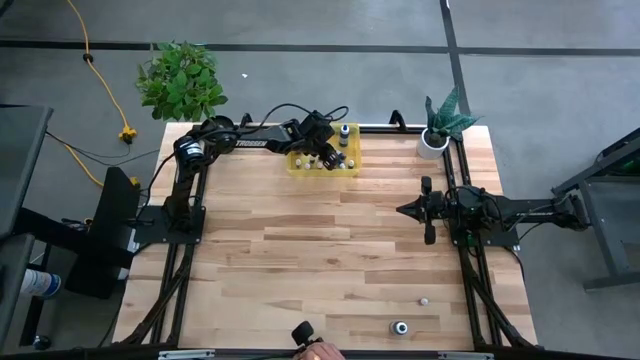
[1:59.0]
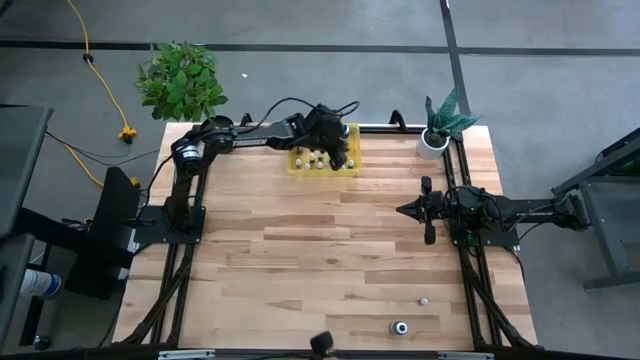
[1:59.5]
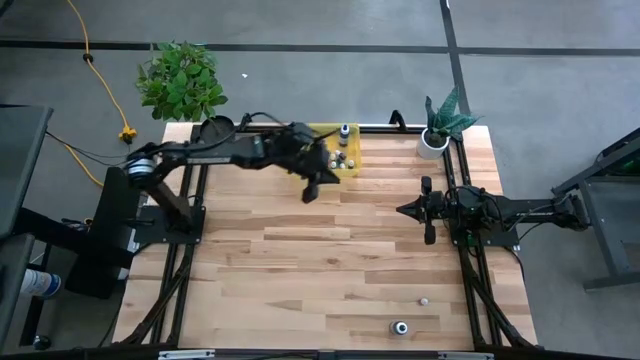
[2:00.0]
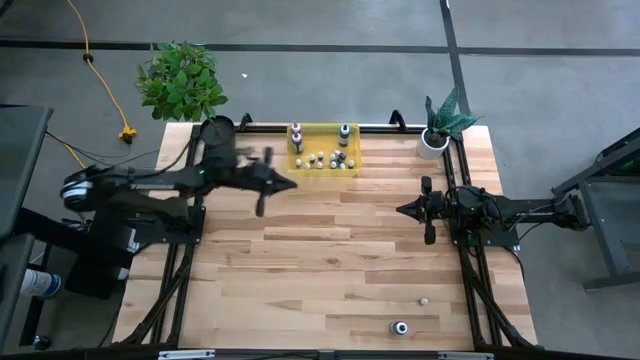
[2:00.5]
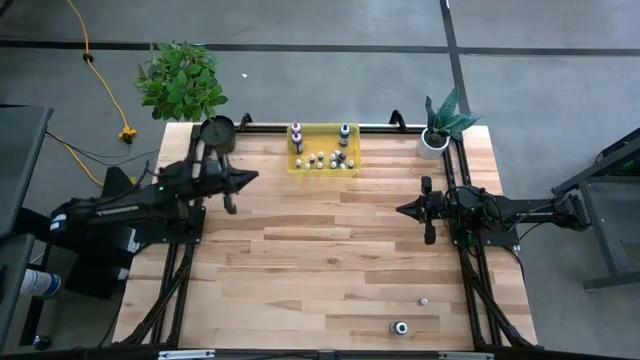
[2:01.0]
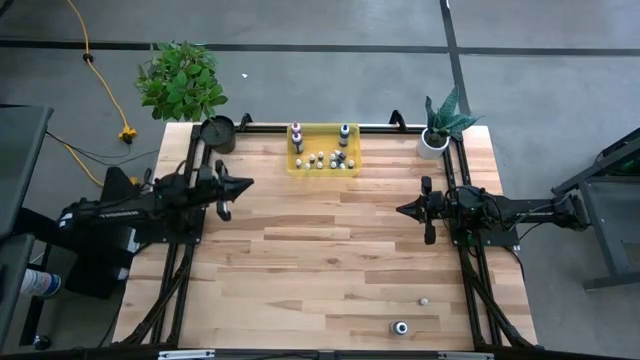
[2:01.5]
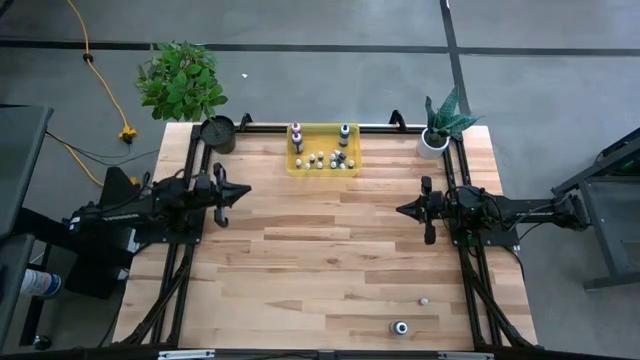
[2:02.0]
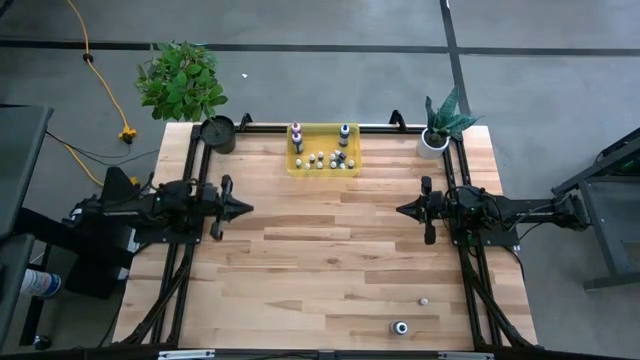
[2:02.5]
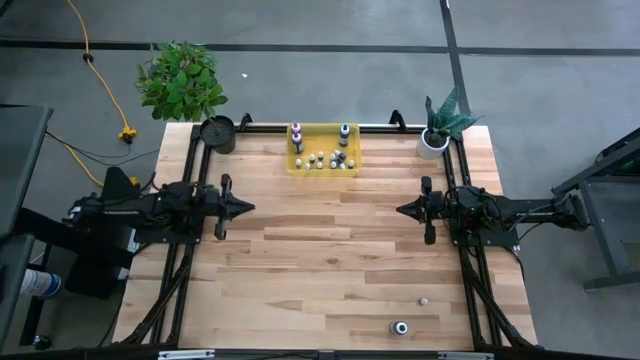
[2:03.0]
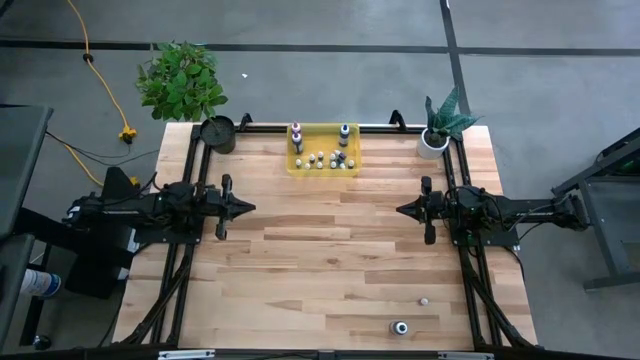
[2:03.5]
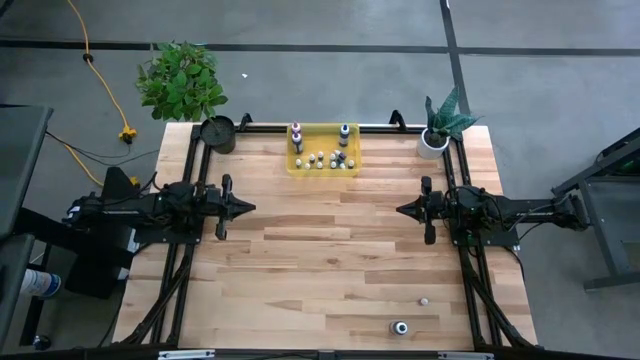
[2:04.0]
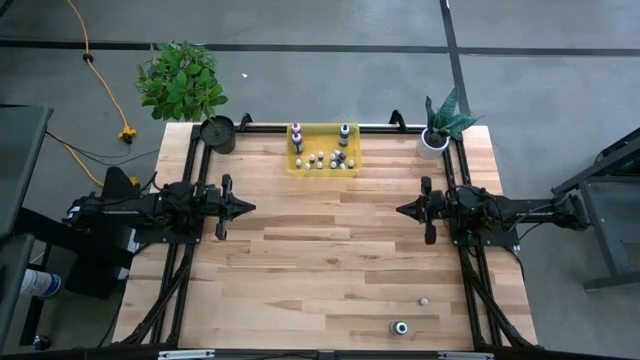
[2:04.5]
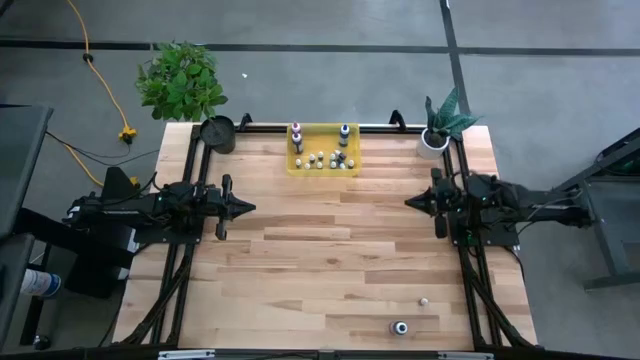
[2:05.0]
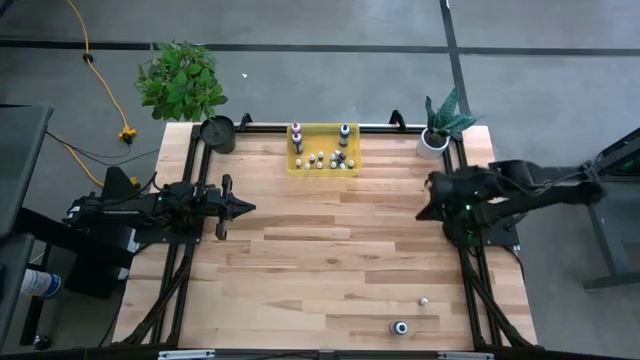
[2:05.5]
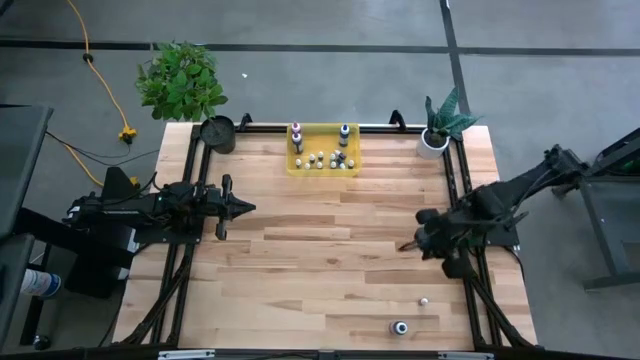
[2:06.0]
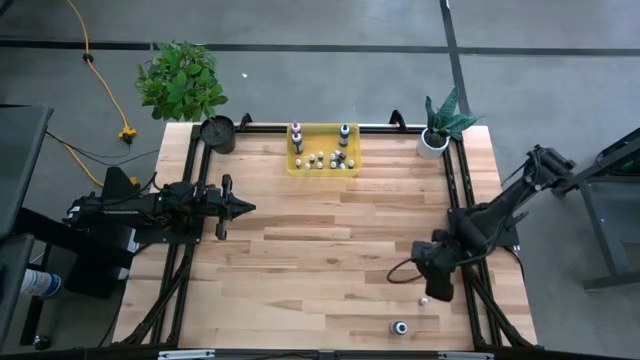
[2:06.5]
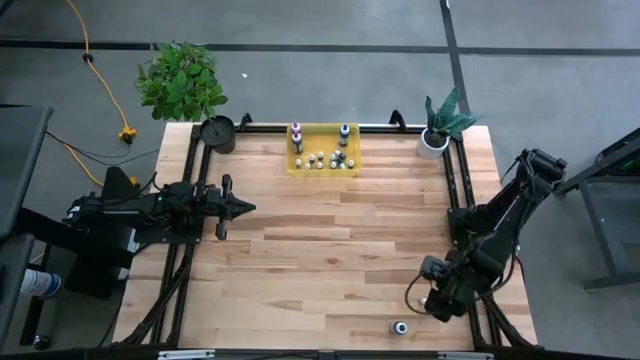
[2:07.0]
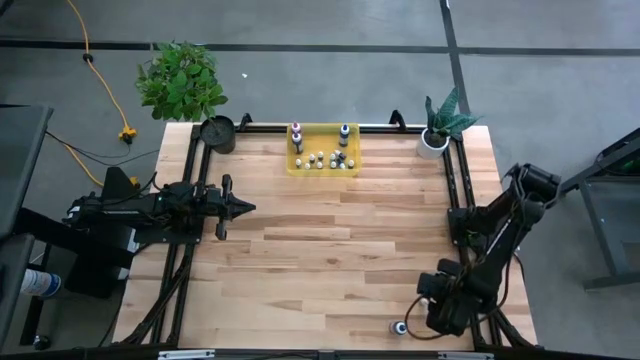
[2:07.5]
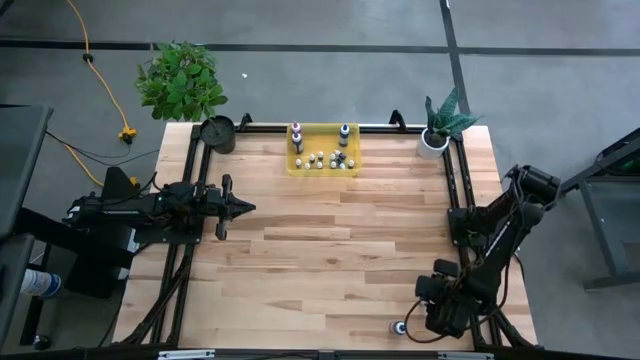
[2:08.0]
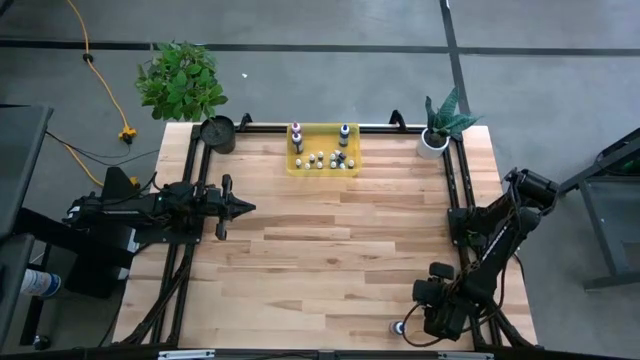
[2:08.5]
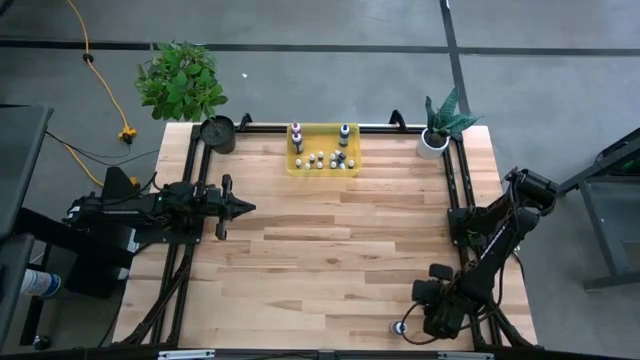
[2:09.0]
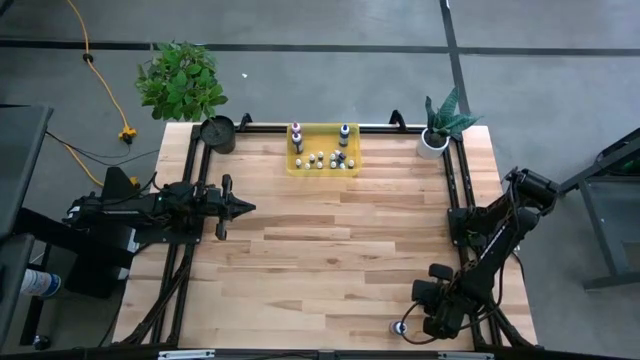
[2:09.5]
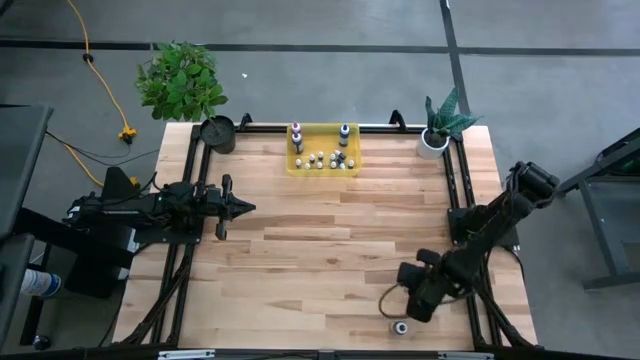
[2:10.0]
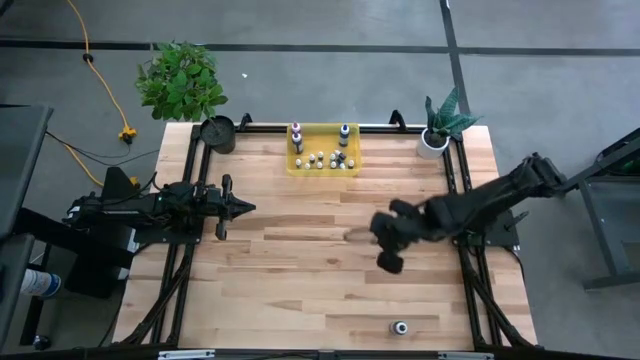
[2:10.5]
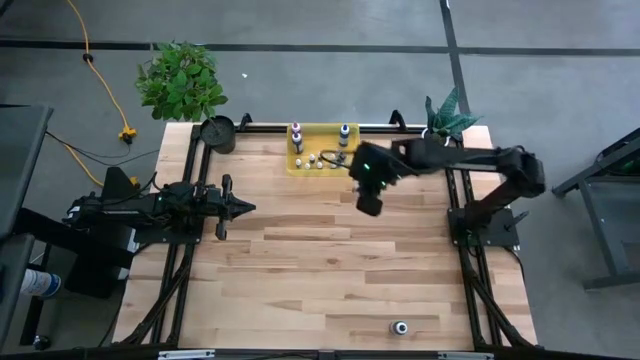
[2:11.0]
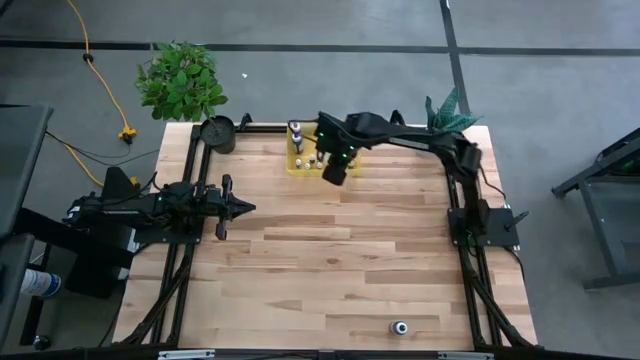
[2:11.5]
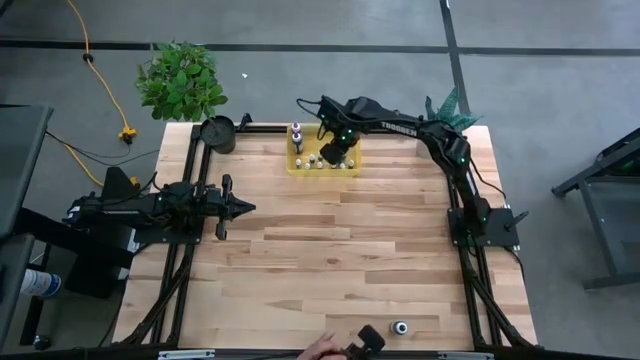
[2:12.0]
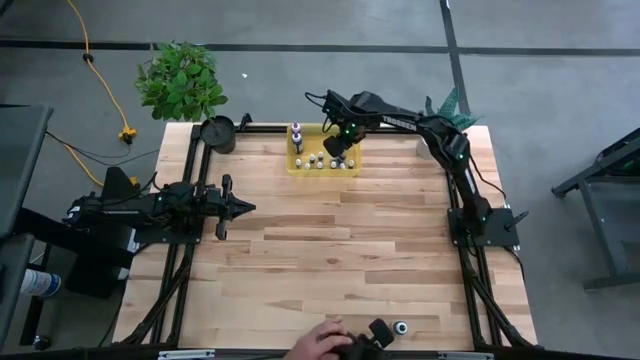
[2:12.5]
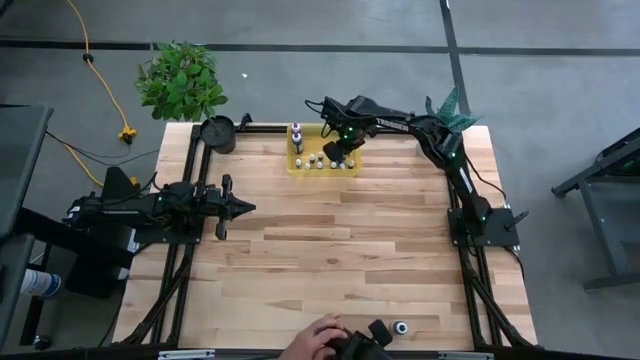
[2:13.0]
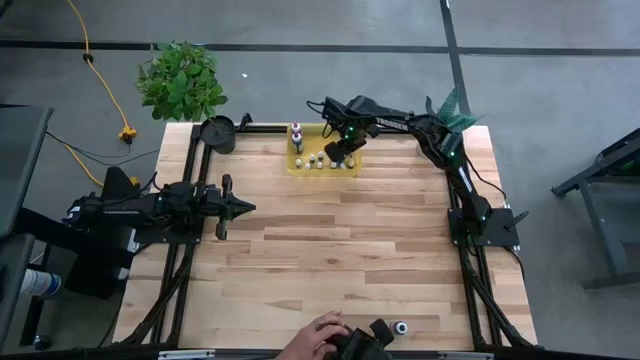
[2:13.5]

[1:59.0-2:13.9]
Task: Pick & Place food coloring
Put the small red food coloring bottle into the yellow container

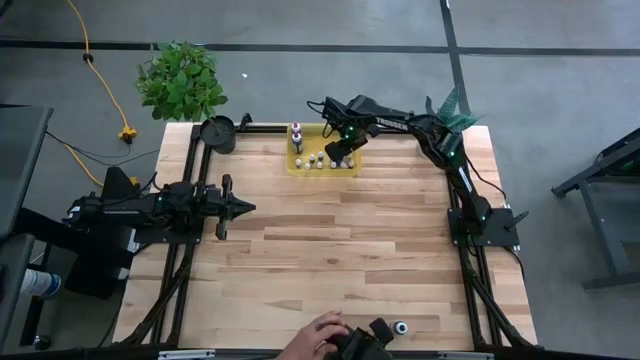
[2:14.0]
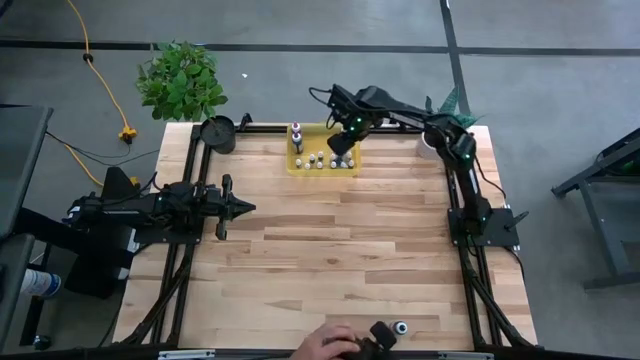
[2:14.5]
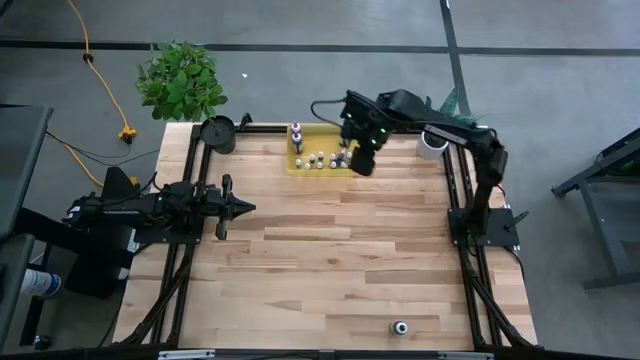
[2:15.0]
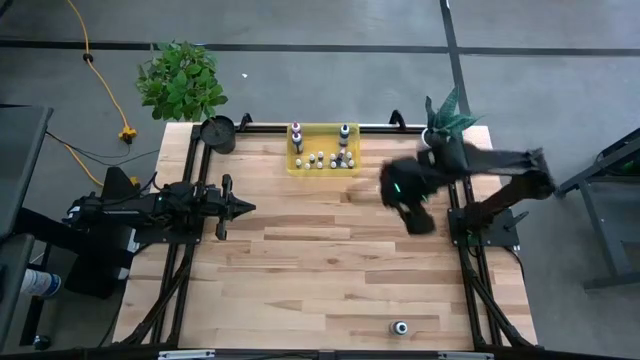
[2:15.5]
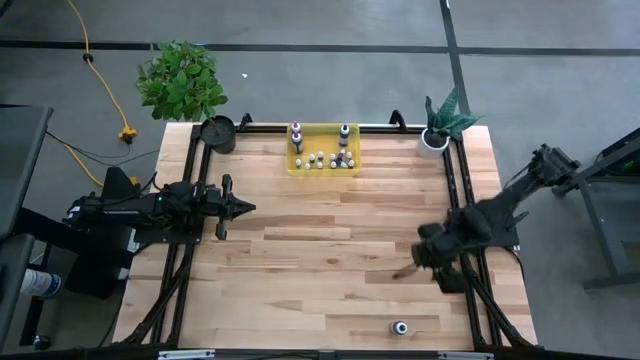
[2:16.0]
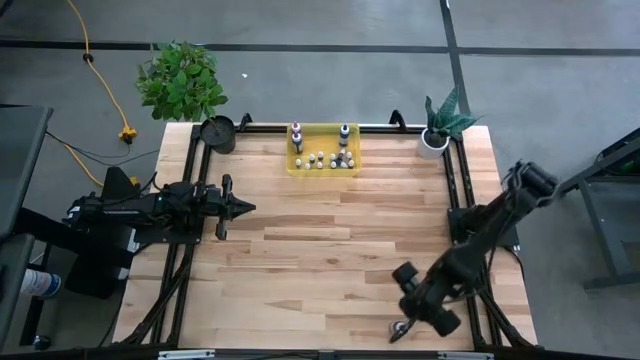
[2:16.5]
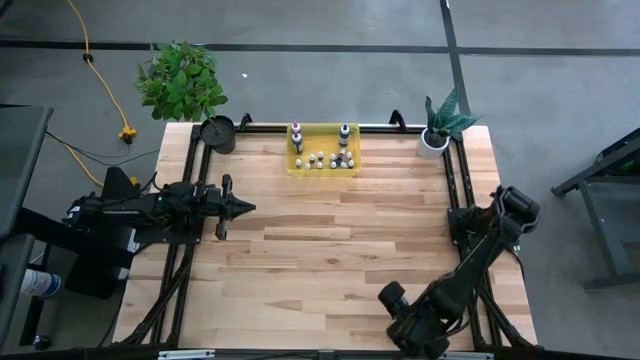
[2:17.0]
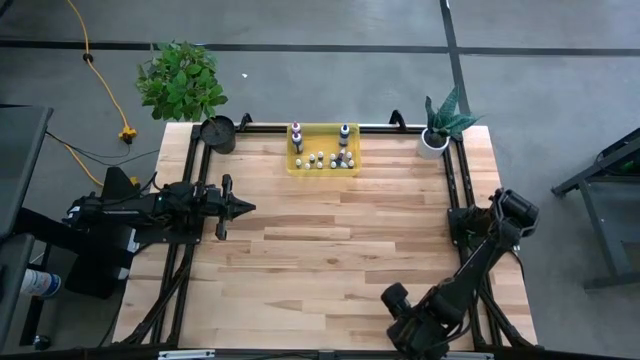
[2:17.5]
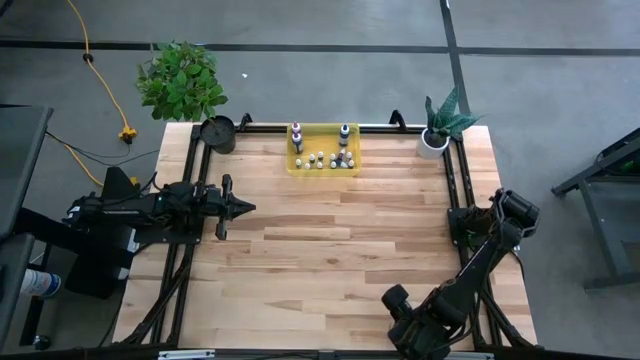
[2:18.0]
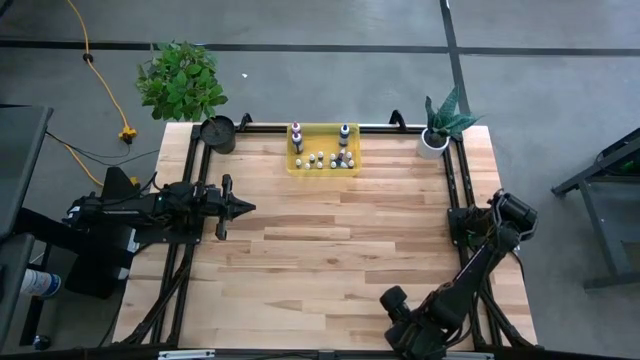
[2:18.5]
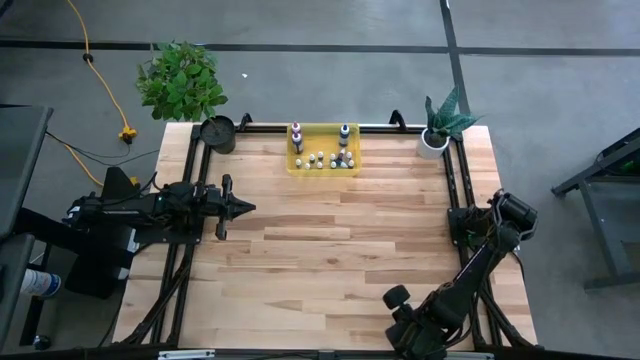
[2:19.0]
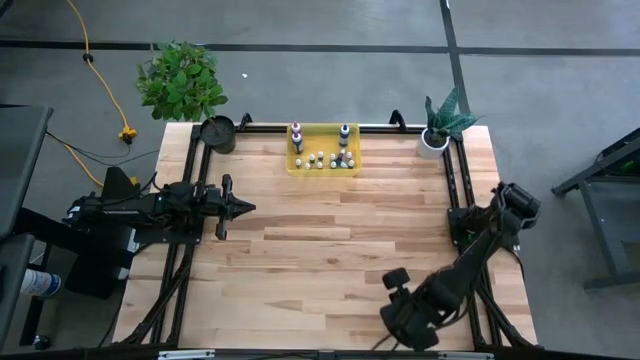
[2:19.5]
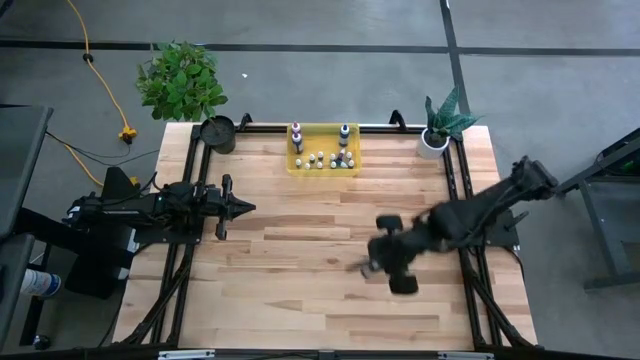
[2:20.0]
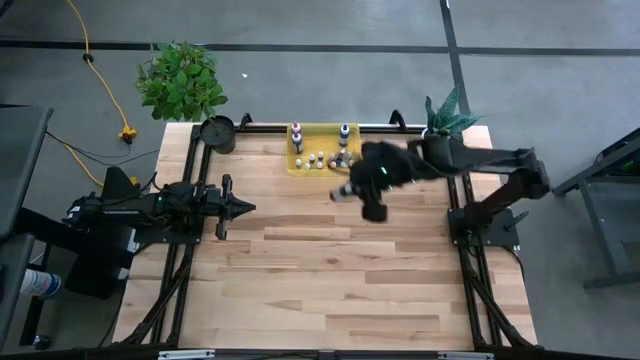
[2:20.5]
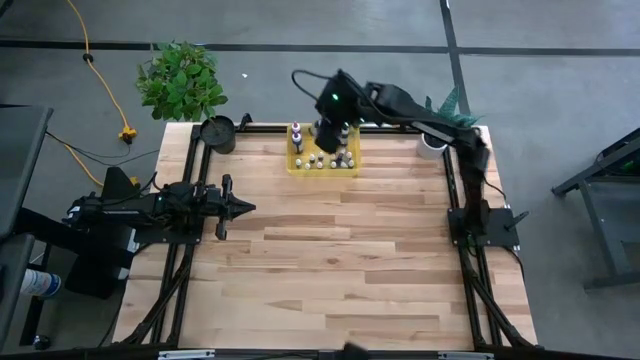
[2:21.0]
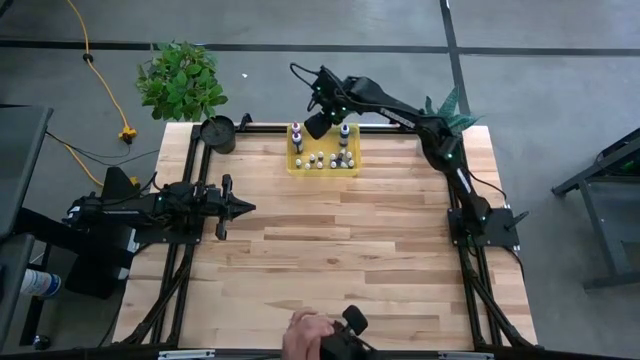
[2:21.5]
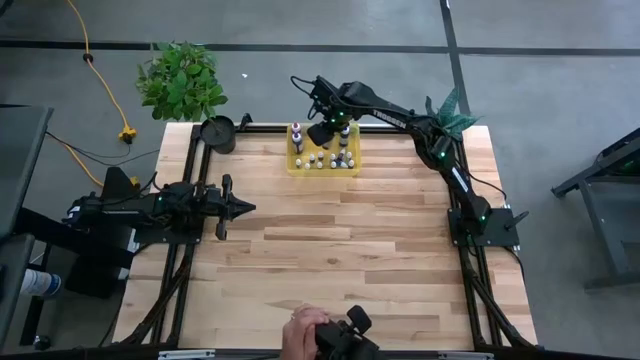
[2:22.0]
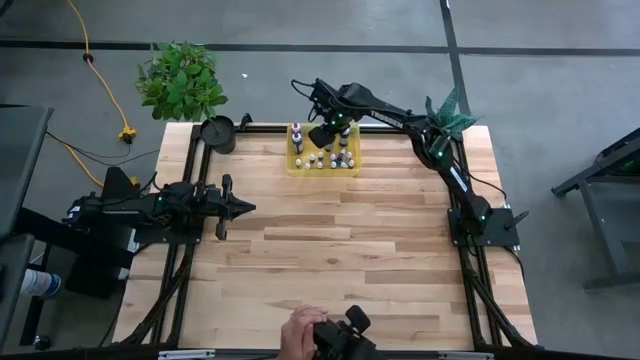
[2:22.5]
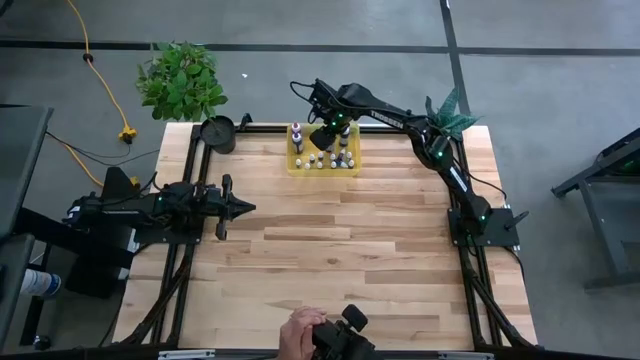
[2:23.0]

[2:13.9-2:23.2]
Put the big black food coloring bottle into the yellow container
